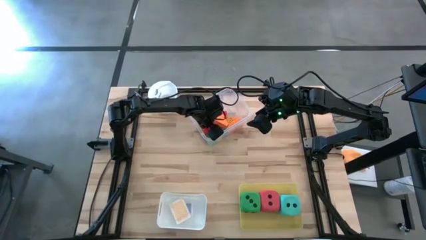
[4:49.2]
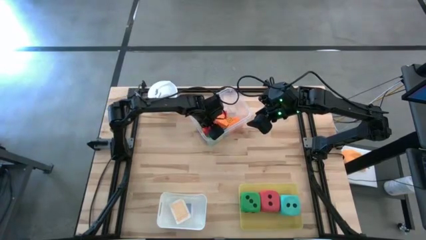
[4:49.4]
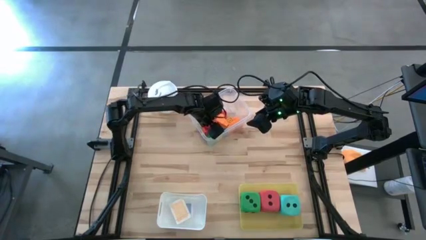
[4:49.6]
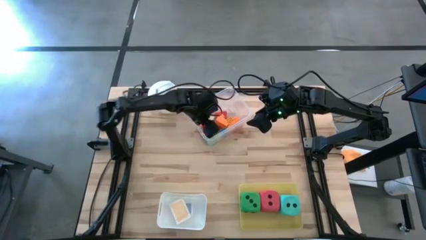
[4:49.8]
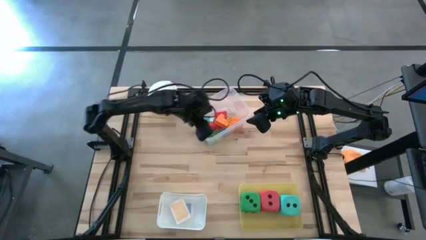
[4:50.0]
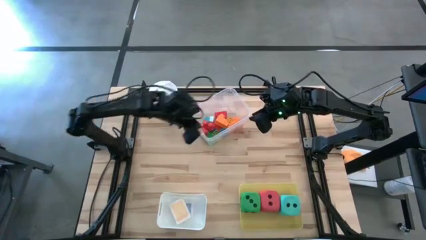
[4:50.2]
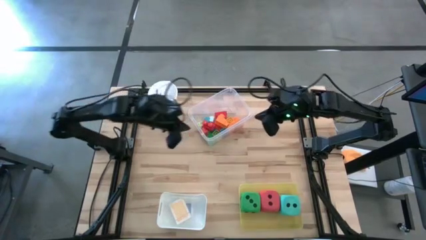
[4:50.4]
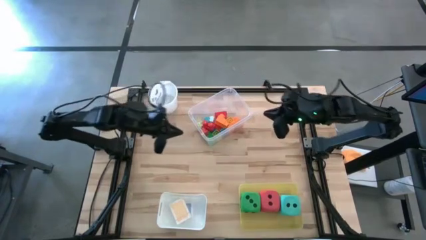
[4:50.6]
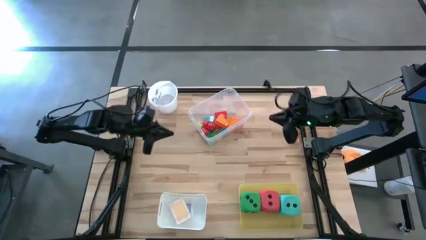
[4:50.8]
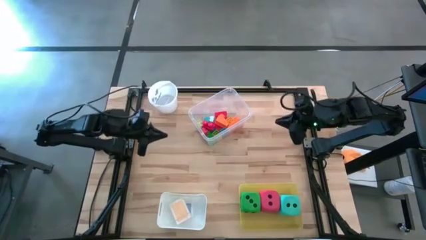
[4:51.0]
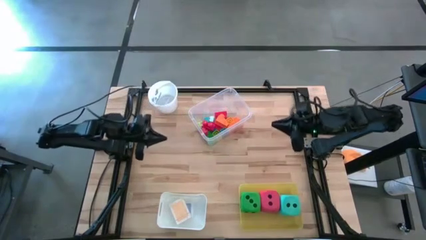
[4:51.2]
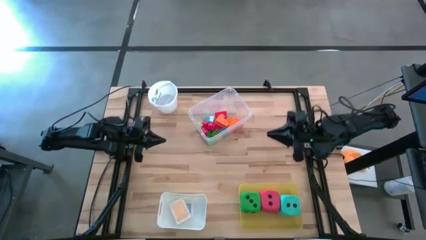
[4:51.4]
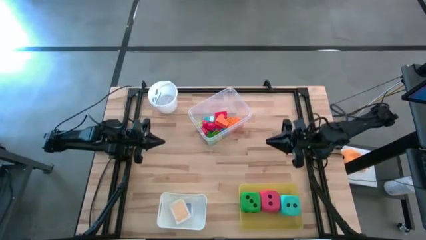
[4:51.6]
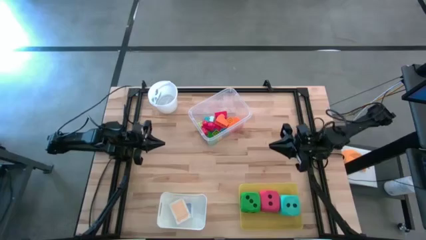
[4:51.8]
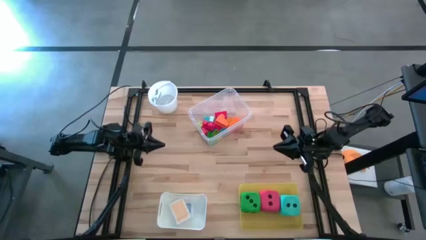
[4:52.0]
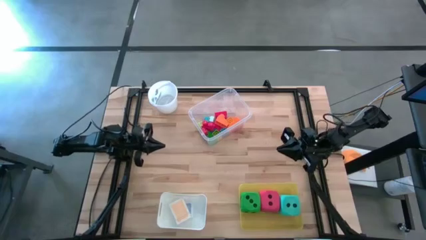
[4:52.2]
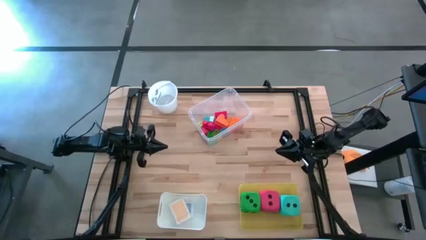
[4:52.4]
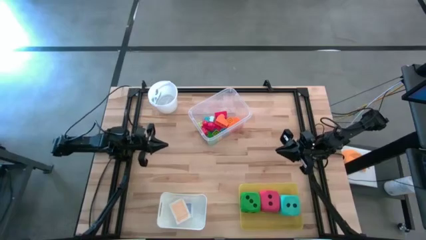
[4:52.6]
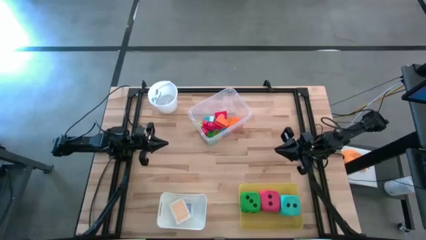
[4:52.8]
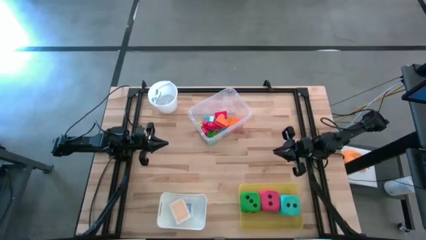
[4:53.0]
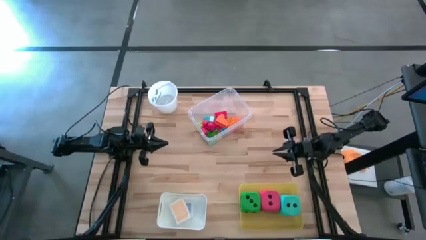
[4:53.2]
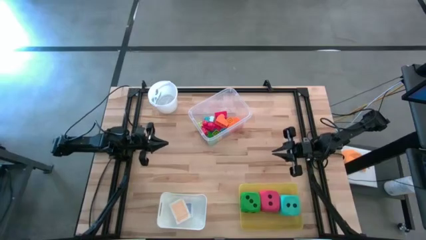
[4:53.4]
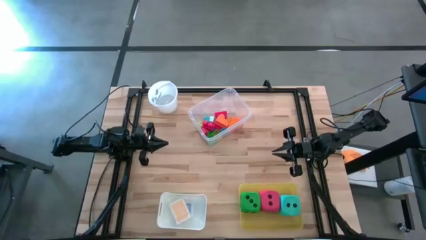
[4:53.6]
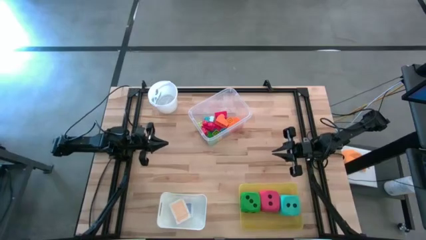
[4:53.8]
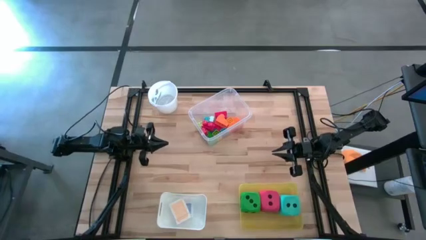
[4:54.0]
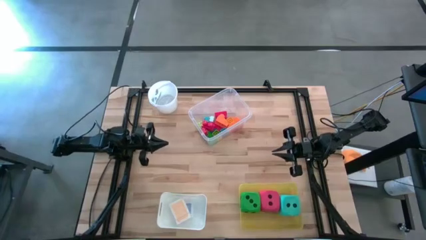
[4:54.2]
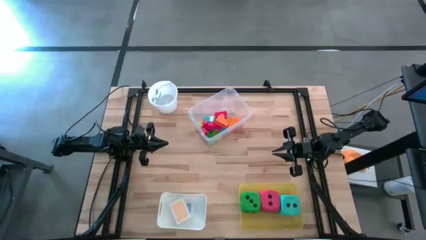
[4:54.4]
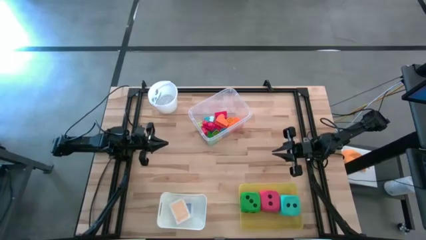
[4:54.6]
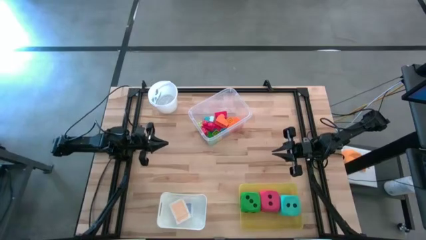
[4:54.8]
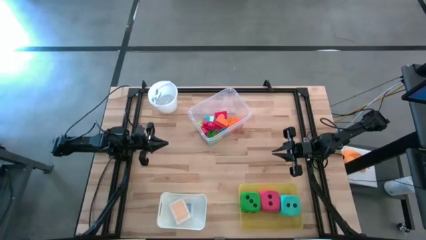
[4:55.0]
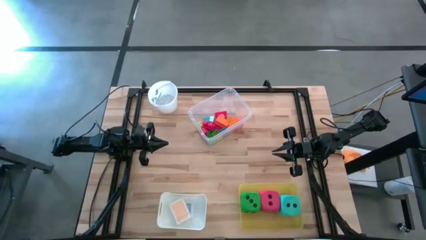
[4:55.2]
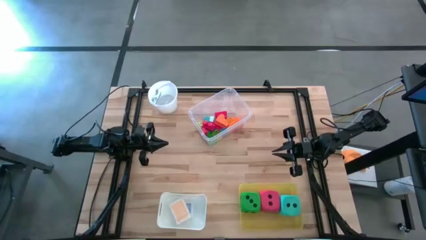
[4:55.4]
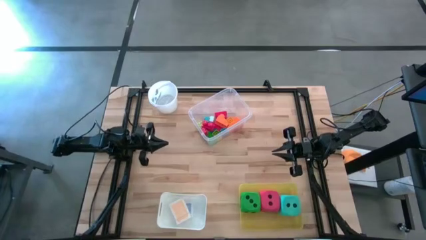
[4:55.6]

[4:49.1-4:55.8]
Task: Pick & Place Toys
Return to Home Position

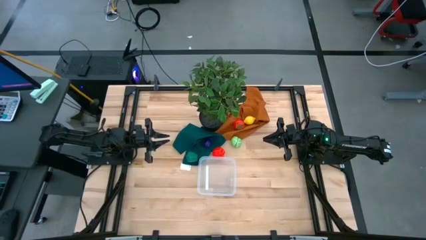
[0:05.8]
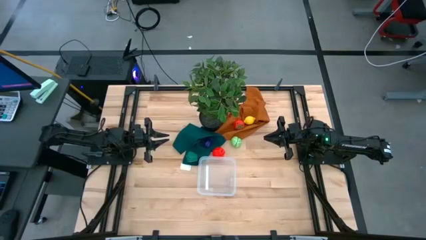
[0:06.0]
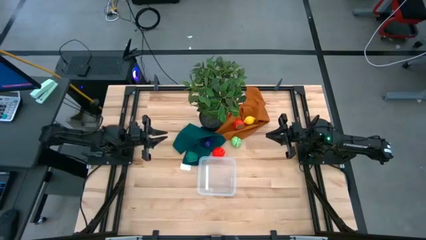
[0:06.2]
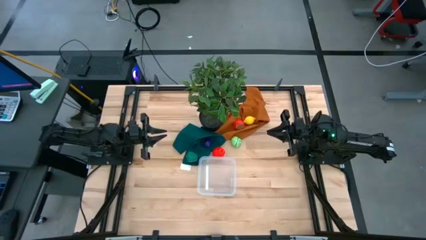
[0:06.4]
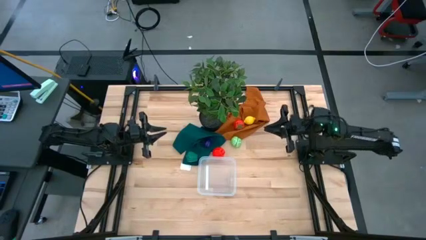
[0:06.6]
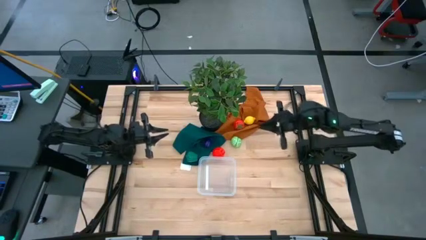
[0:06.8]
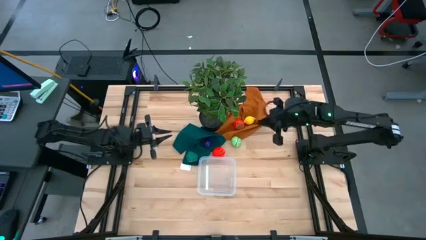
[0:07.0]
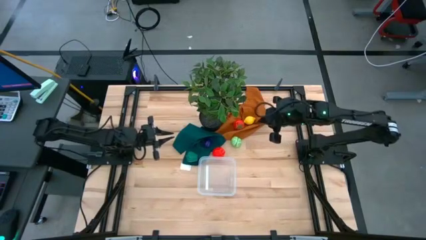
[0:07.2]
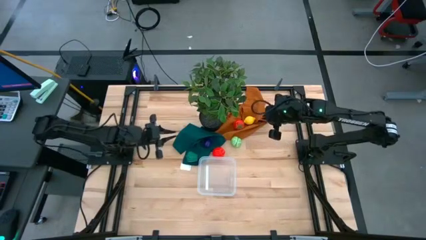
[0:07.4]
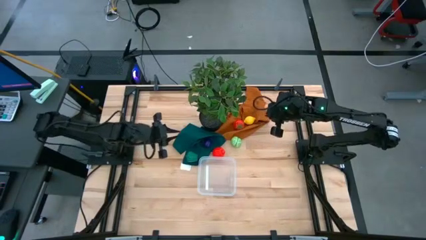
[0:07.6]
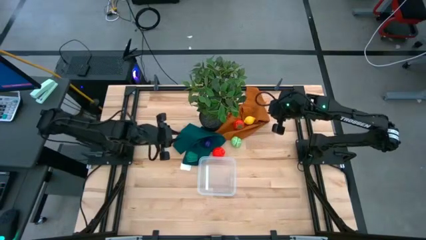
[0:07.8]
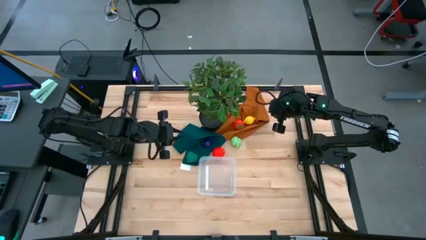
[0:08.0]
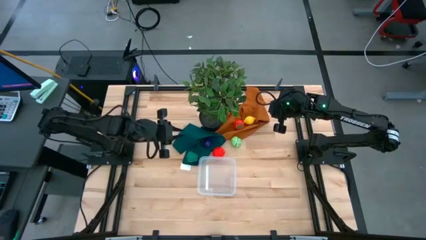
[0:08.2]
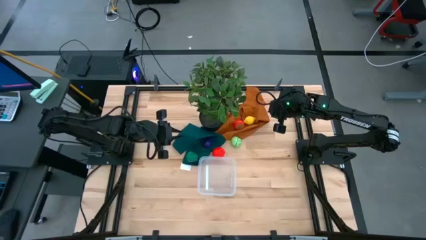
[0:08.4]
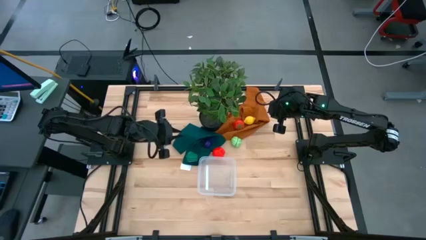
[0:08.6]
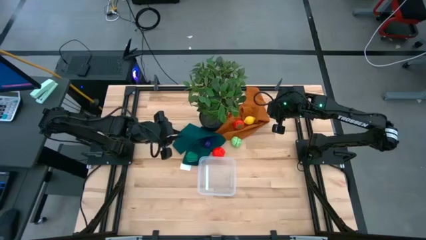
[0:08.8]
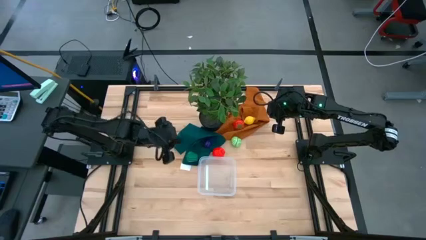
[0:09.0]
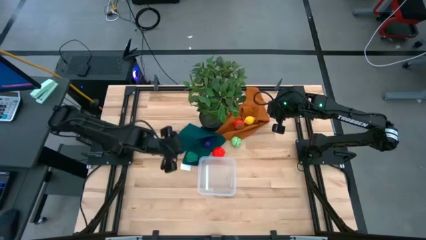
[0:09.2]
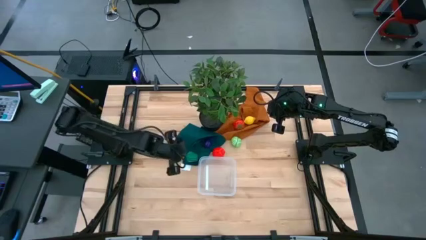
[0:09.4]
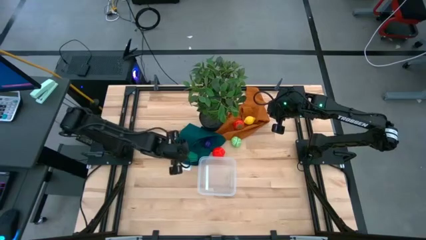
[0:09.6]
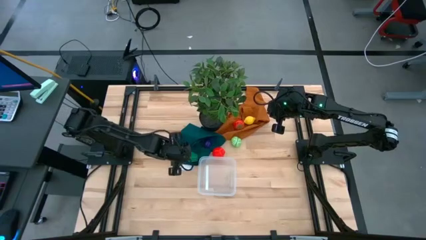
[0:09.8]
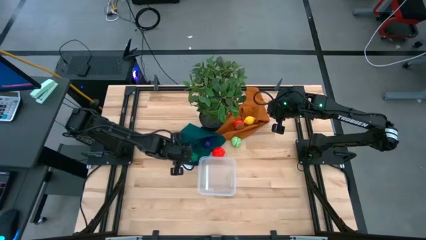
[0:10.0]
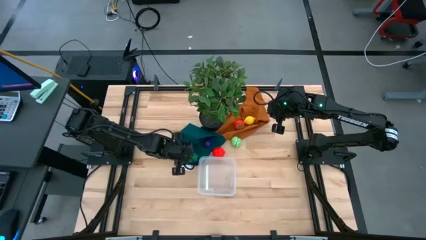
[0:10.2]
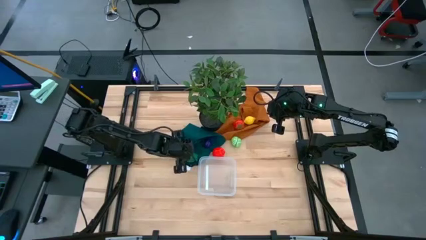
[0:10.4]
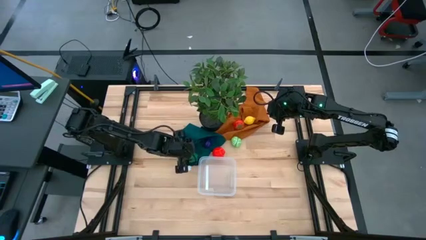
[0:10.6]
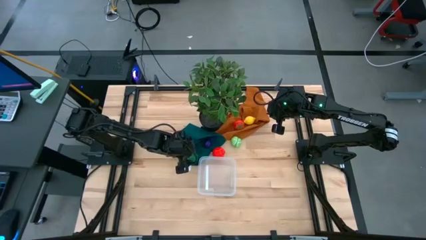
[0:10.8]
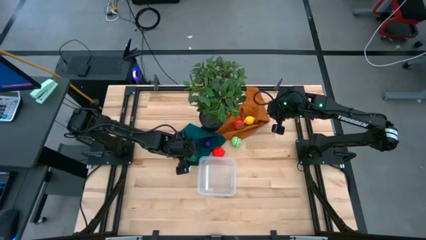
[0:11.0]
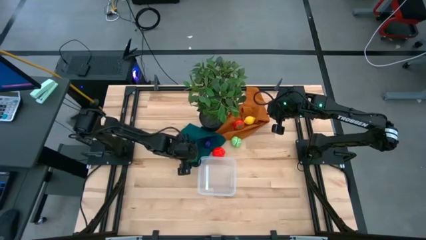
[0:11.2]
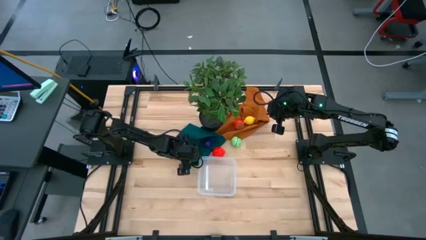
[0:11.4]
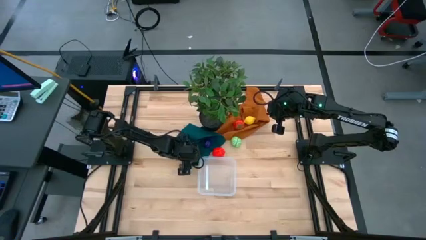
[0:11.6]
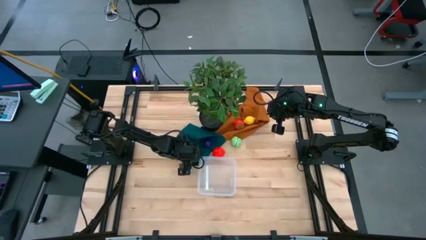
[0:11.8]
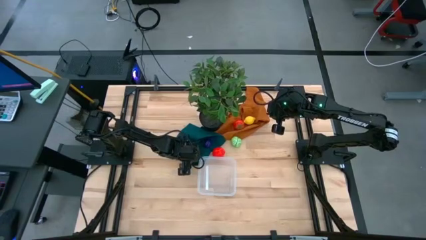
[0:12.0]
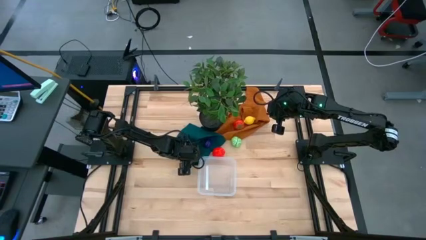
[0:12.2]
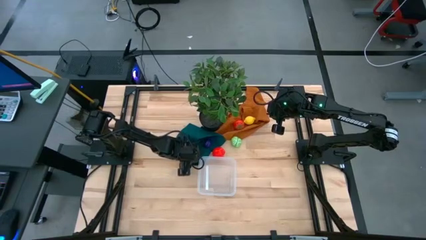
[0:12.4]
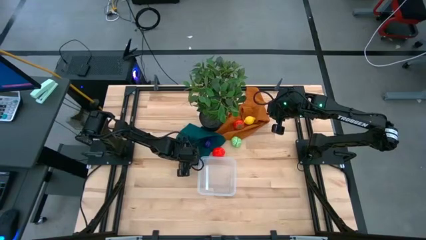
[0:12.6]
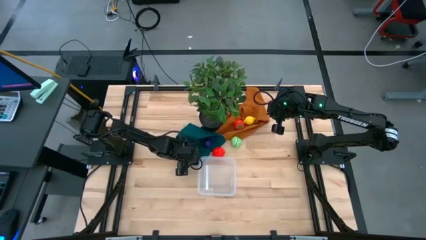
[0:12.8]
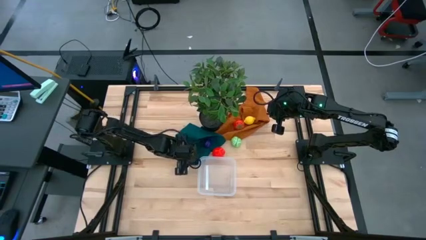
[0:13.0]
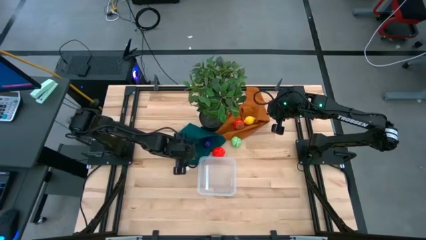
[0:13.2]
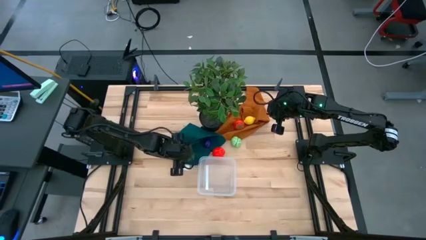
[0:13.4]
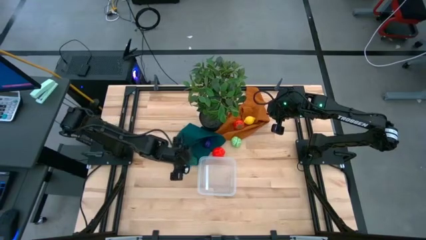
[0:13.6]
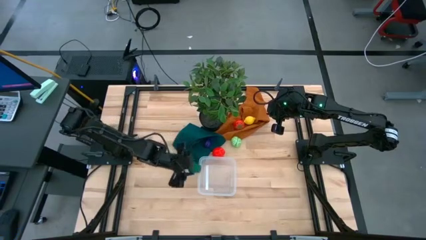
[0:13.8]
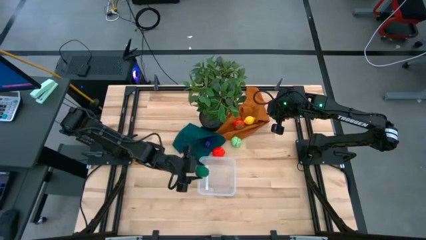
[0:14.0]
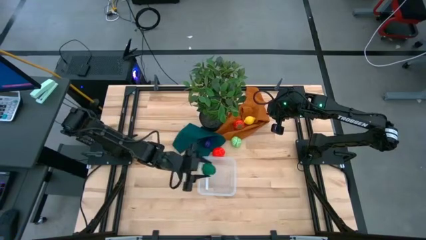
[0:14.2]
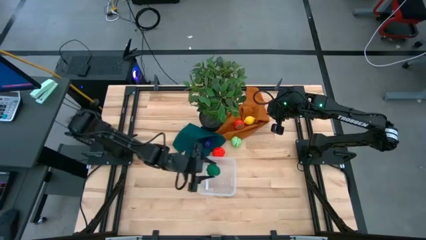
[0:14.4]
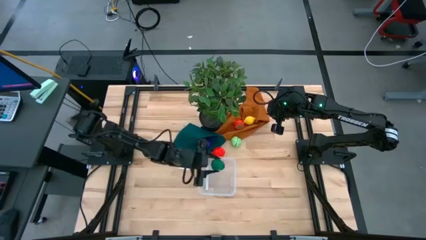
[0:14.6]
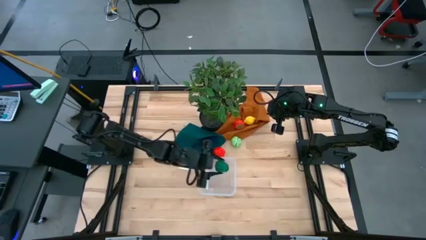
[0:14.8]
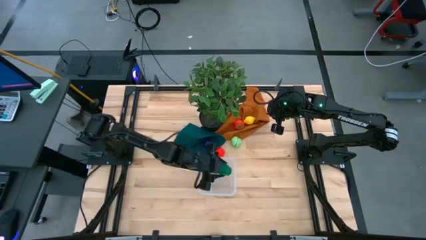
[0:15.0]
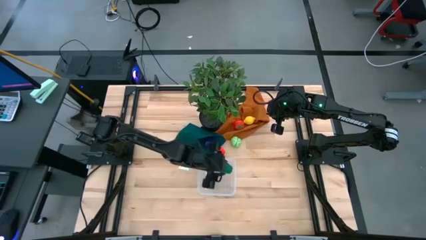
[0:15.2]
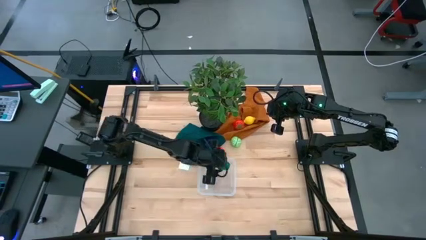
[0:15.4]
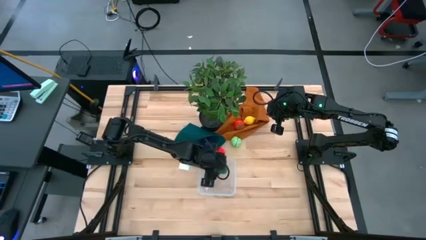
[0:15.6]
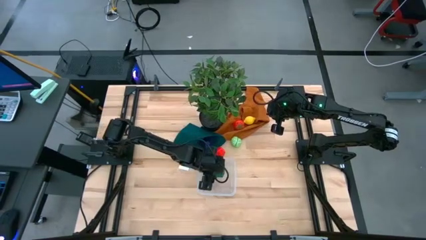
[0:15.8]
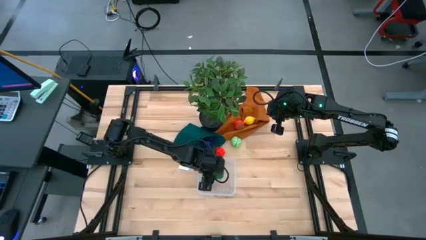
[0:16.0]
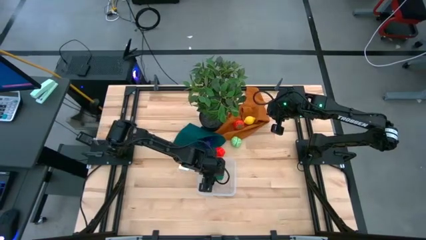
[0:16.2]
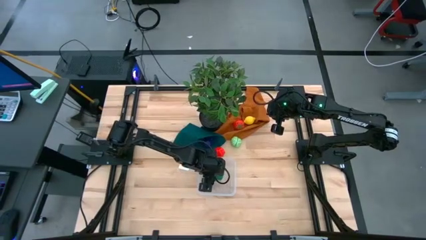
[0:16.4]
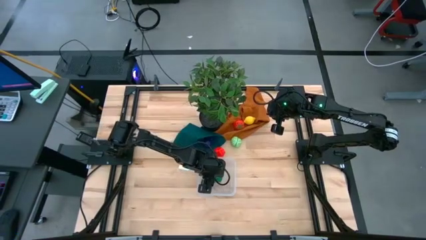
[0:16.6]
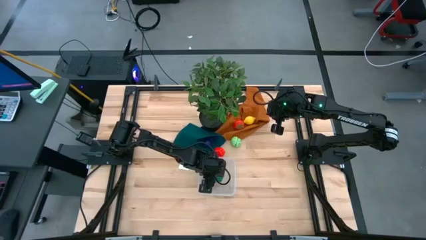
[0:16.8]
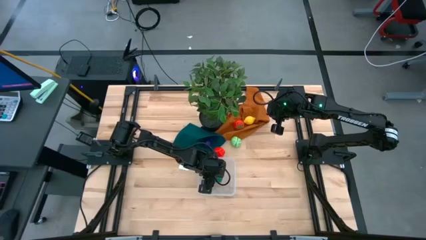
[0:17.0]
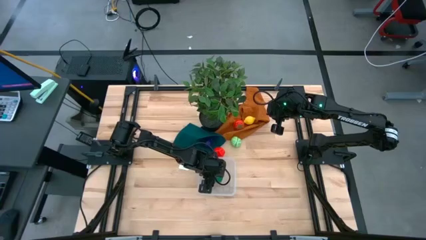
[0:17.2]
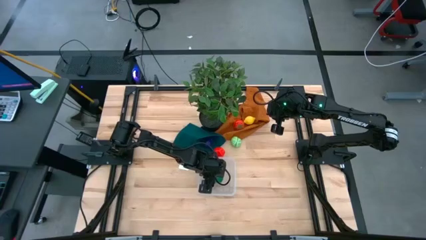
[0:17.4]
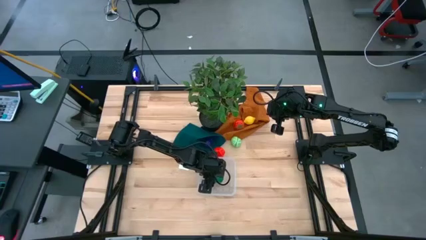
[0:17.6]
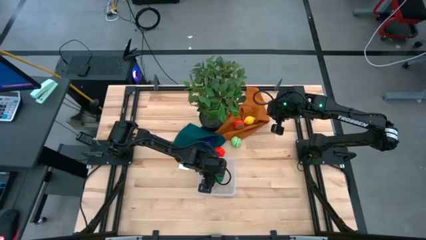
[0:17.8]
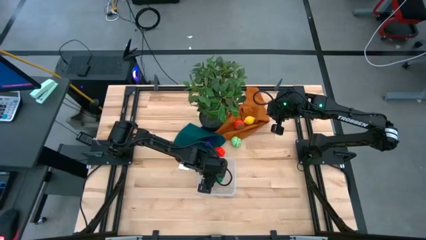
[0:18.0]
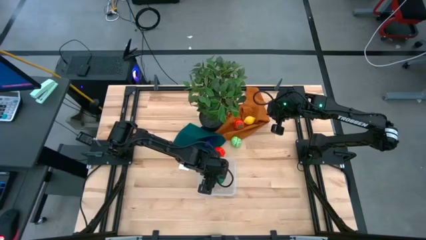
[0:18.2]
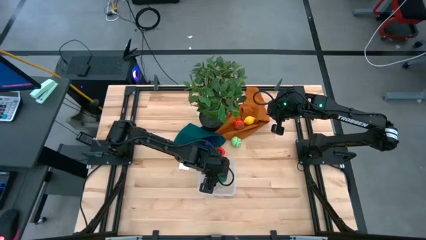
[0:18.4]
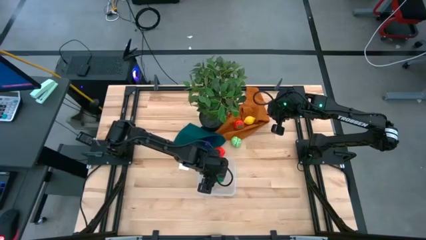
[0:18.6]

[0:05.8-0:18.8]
Task: Pick and placing Produce into tupperware
Put the bell pepper into the transparent bin
